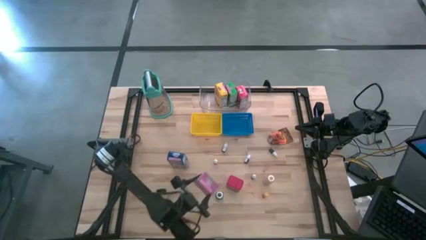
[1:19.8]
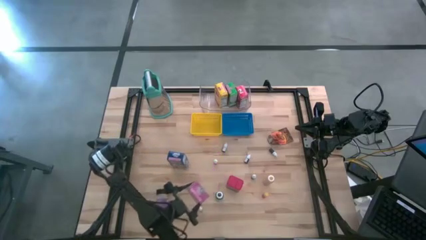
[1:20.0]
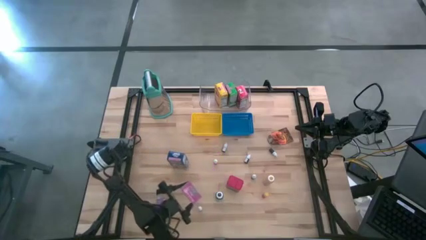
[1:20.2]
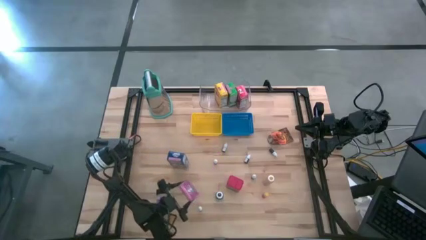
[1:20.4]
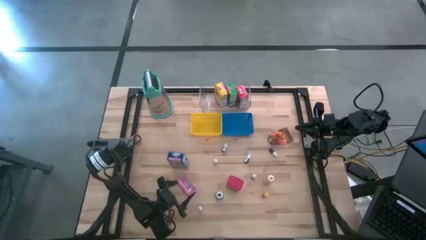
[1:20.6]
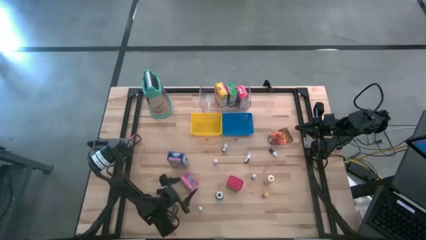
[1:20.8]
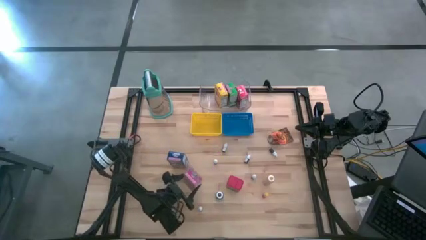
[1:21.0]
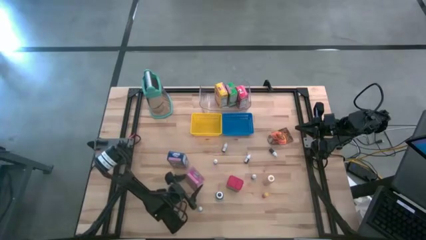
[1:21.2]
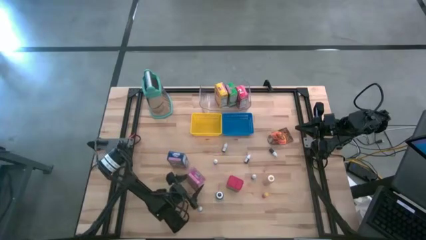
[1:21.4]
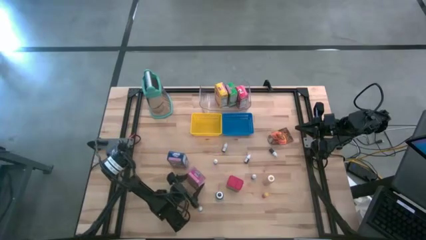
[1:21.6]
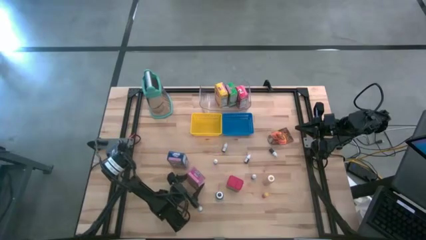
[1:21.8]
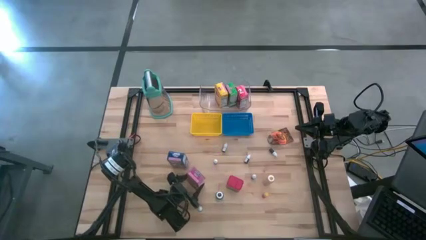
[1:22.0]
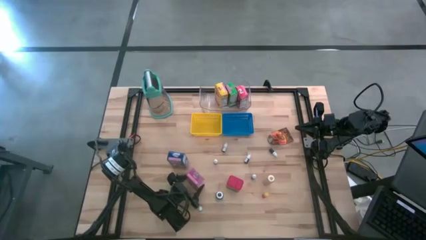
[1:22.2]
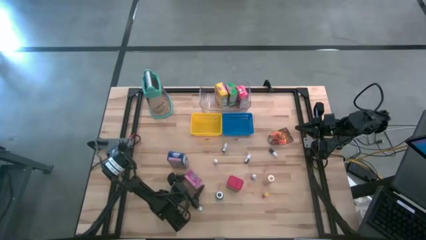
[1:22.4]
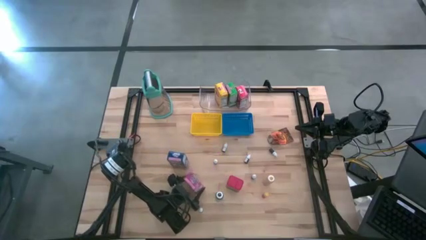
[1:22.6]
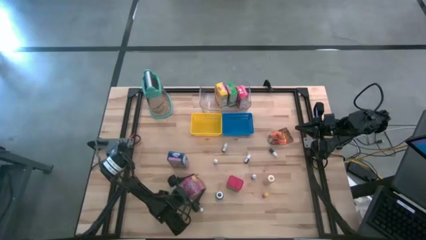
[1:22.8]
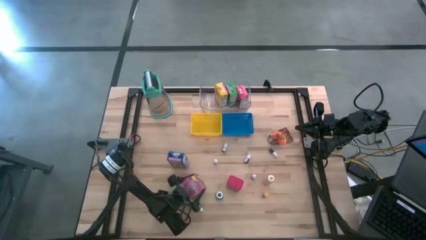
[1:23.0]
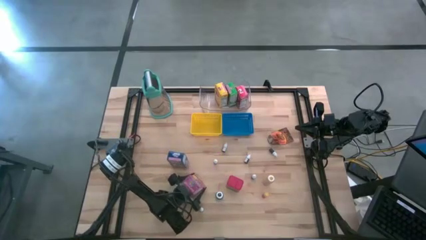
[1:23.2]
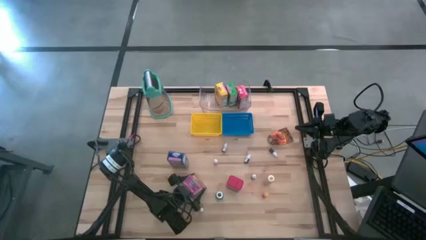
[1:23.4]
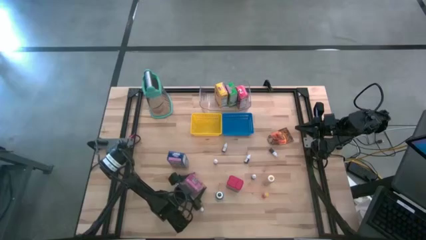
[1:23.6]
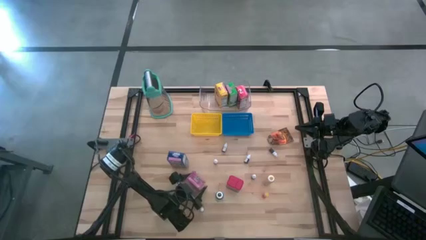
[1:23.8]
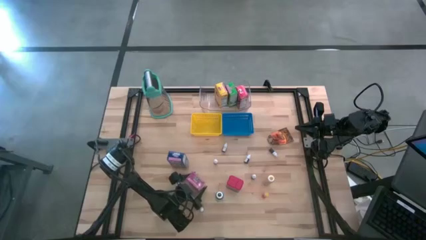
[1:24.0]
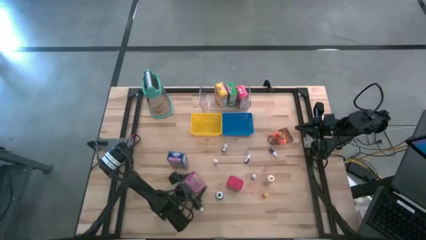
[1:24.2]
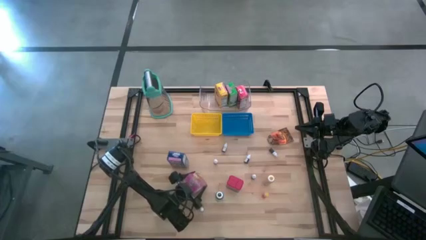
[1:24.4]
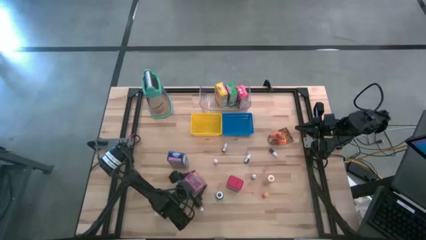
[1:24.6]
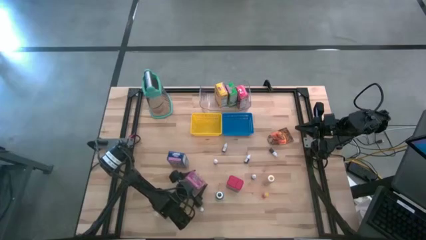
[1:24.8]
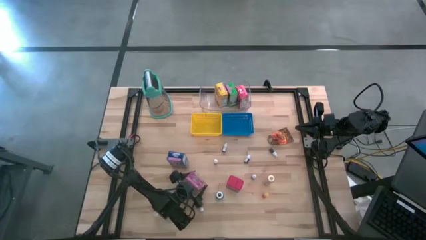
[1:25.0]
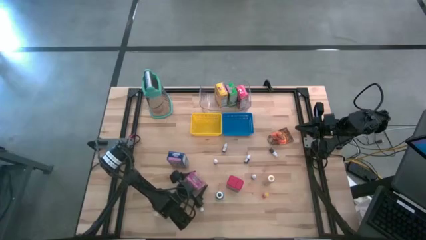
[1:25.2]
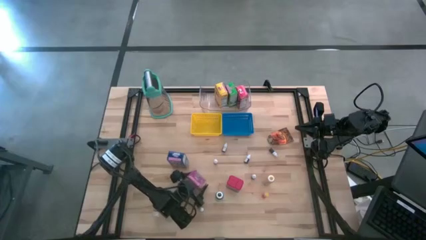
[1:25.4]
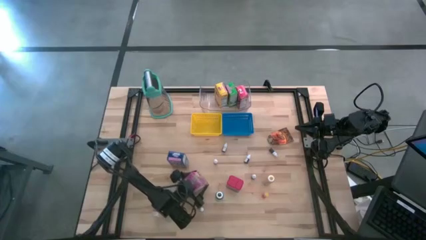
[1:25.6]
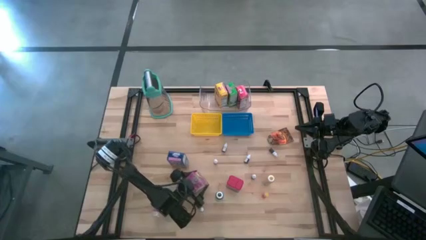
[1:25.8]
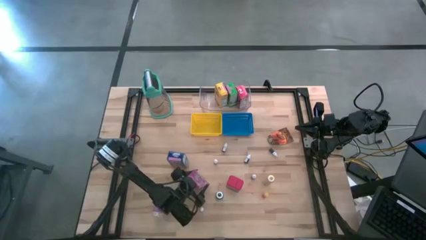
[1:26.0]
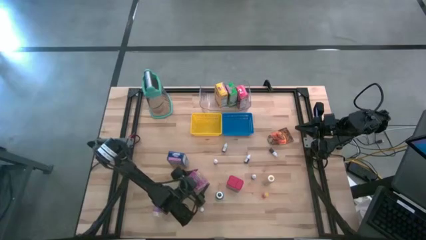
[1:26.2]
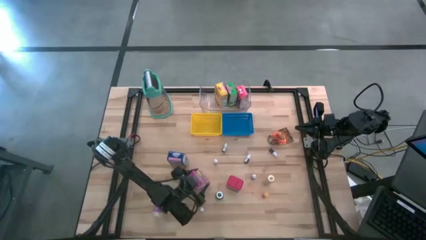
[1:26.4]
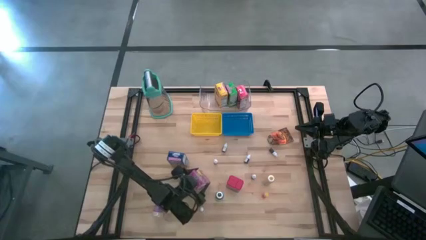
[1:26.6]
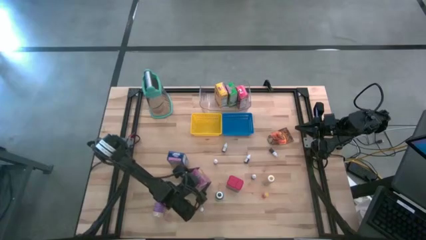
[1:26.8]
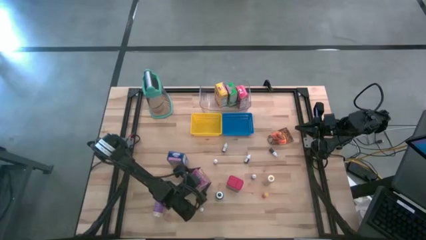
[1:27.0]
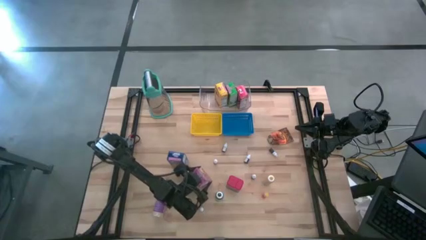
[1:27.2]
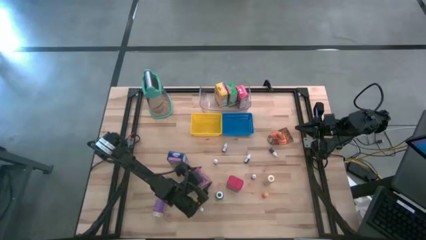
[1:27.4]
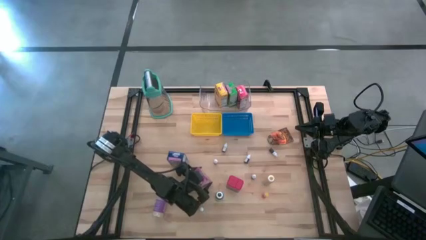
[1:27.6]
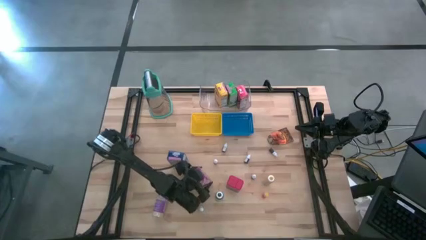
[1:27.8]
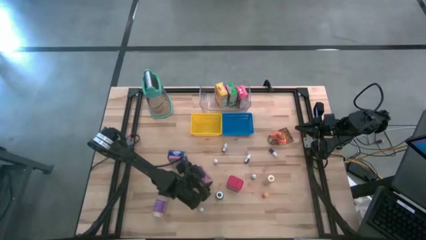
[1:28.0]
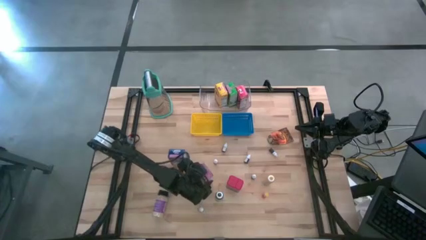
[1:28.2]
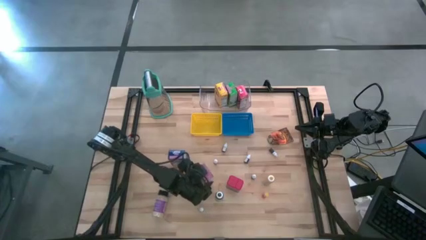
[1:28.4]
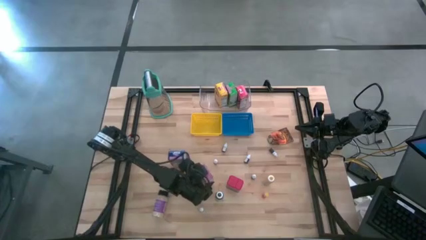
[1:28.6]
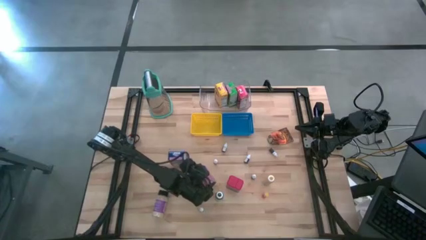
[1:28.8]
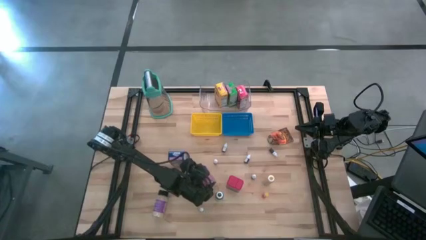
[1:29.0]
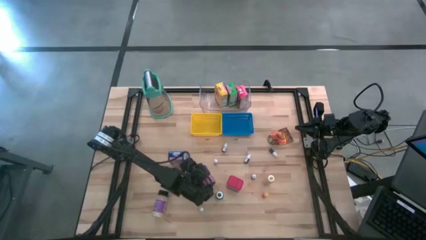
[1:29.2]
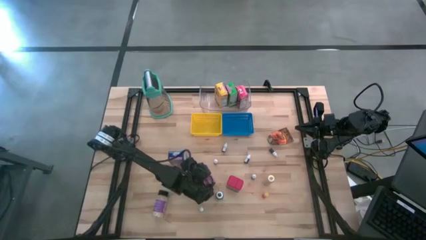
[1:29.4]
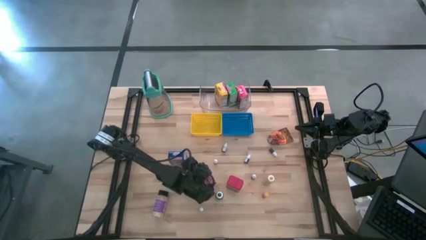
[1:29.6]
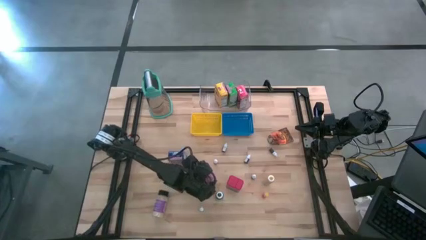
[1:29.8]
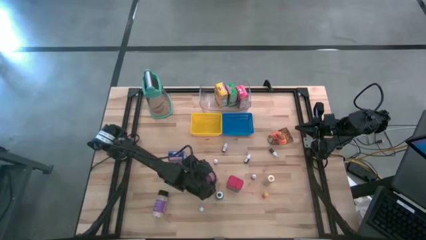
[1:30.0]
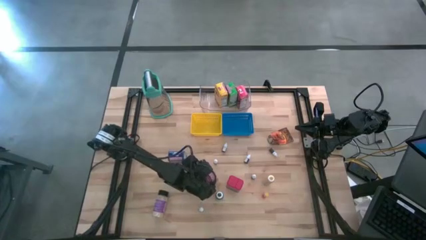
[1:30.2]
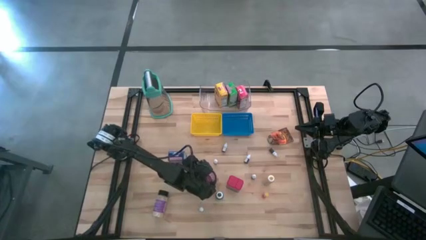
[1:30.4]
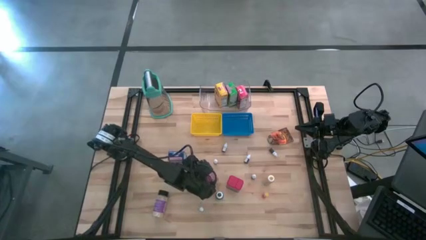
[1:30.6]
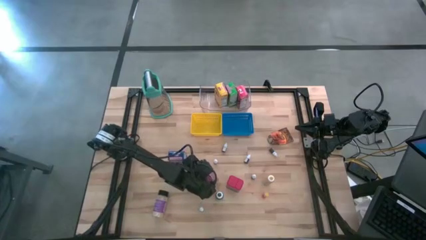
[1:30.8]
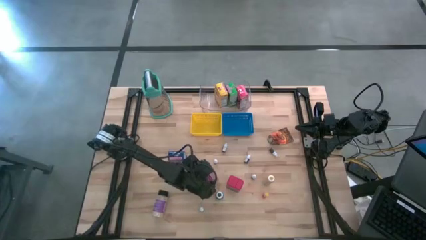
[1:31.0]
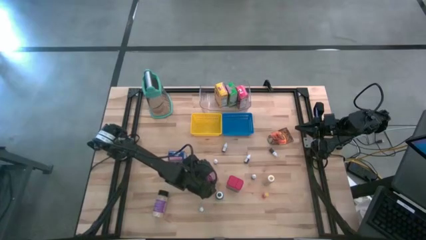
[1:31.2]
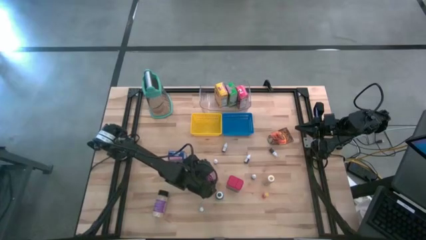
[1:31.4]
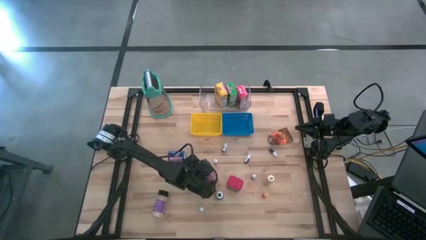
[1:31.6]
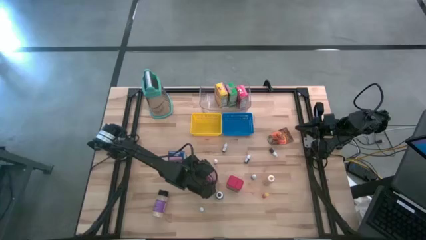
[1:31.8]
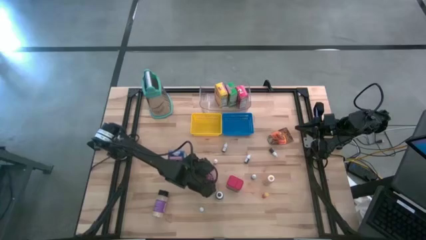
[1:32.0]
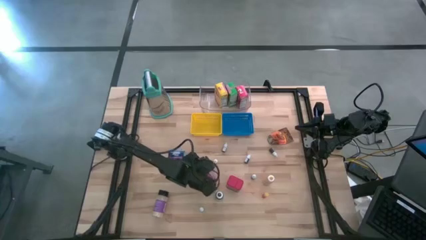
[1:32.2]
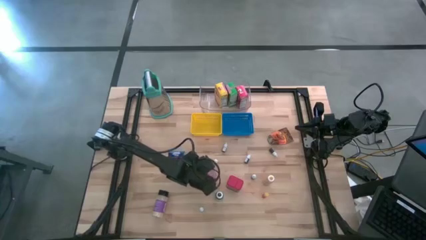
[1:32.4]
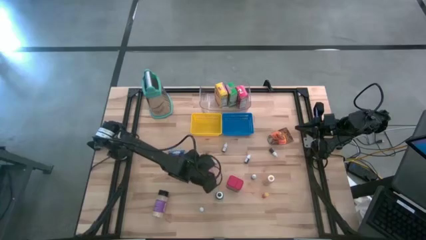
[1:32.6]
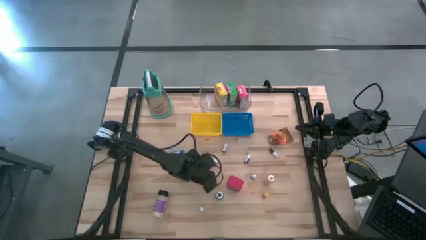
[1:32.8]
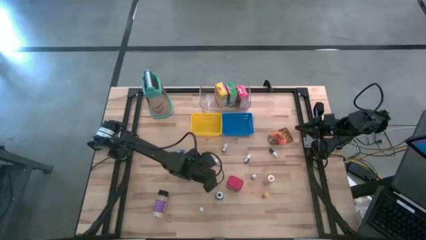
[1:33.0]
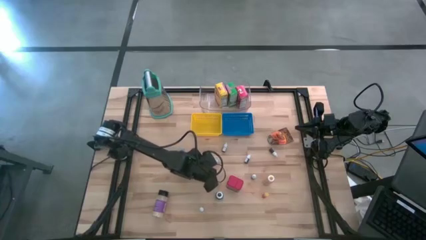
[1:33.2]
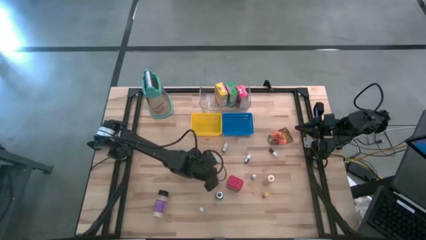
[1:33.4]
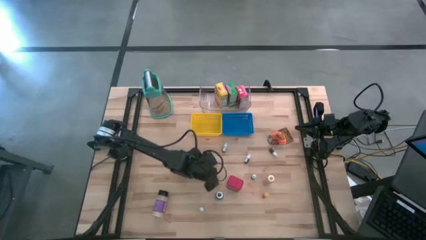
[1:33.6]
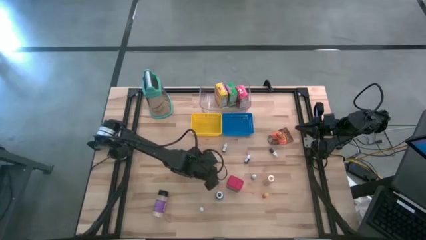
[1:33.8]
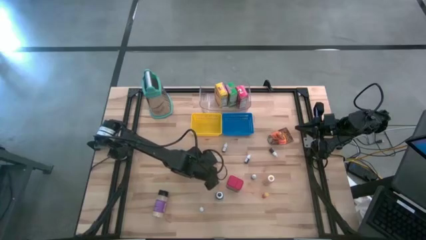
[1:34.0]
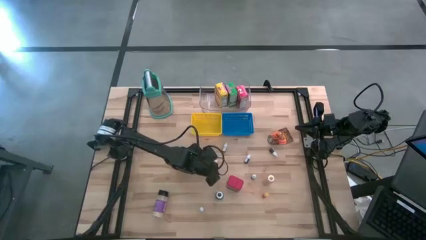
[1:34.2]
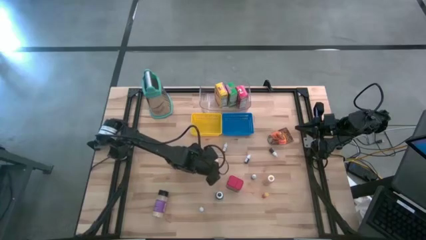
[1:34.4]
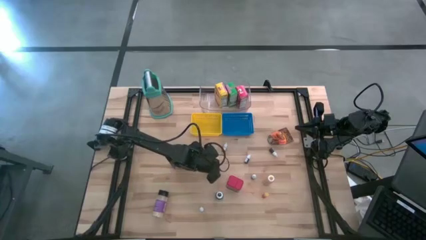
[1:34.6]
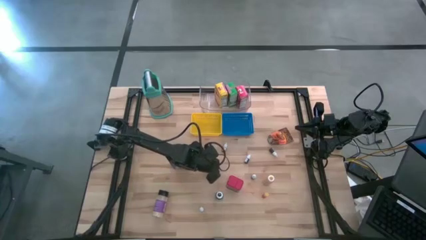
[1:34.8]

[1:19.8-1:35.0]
Task: Pick & Place Kitchen Items
Adjust the cereal boxes on the table
